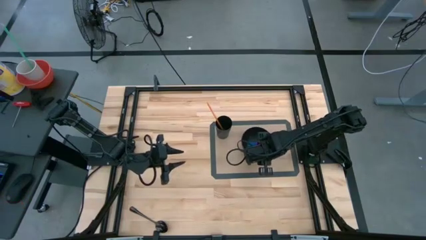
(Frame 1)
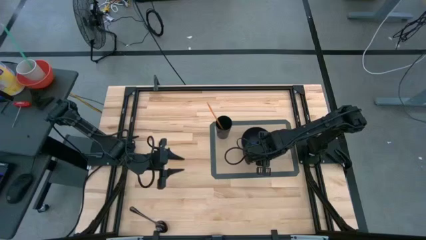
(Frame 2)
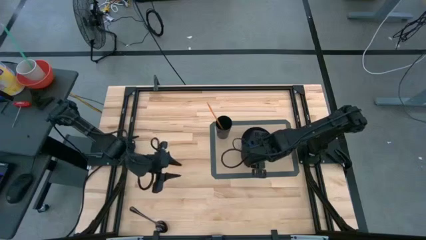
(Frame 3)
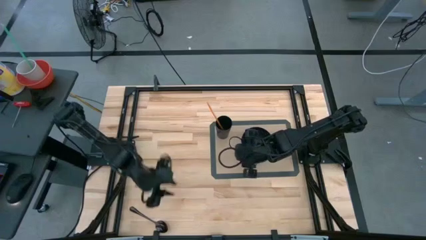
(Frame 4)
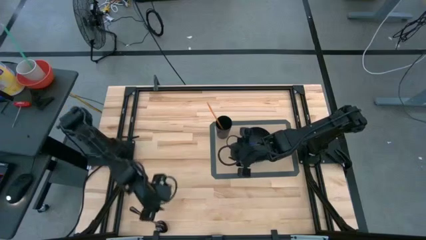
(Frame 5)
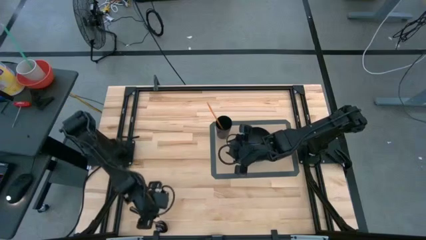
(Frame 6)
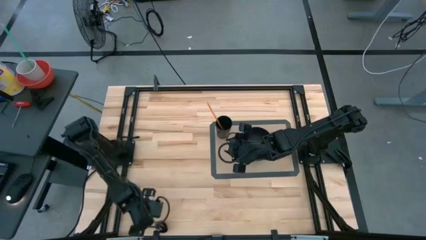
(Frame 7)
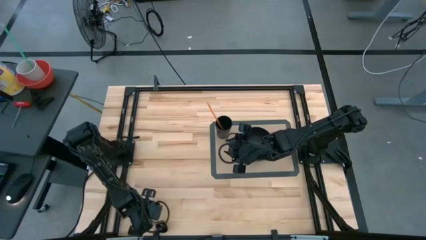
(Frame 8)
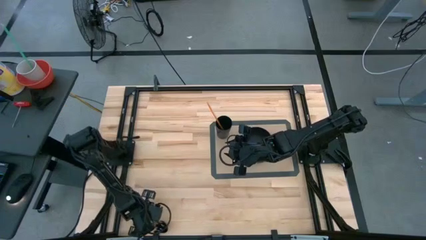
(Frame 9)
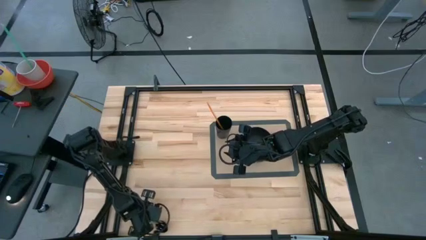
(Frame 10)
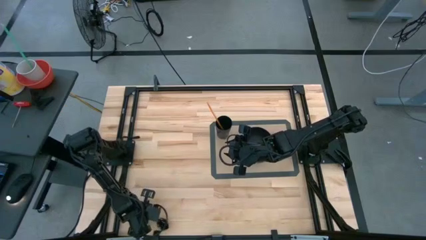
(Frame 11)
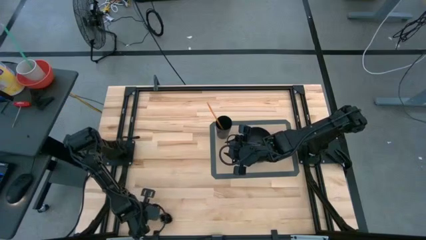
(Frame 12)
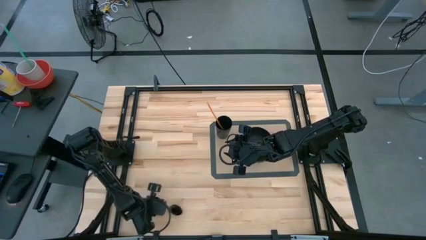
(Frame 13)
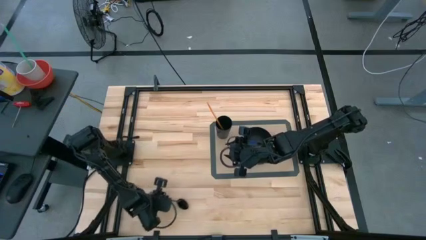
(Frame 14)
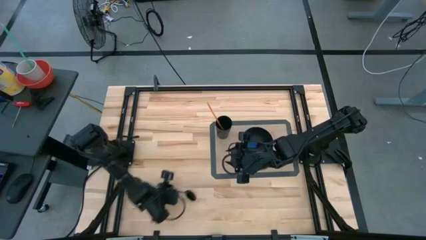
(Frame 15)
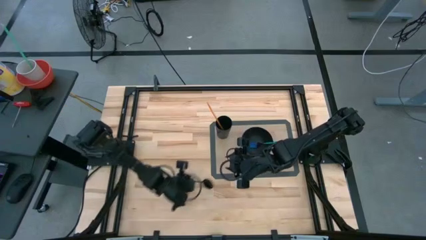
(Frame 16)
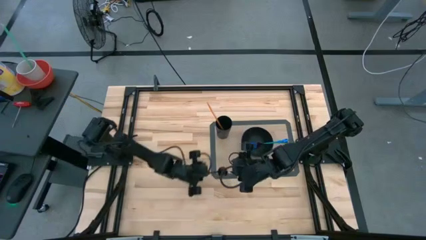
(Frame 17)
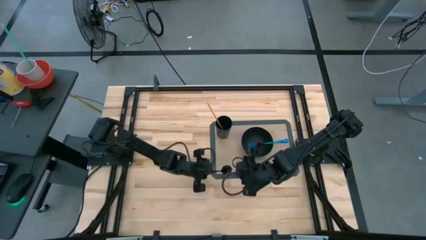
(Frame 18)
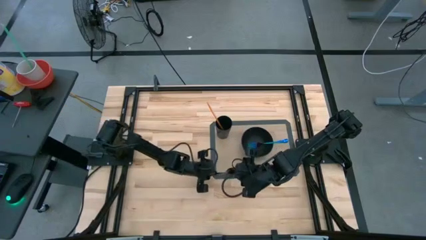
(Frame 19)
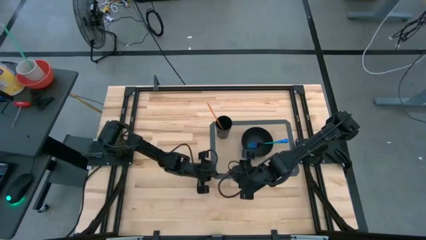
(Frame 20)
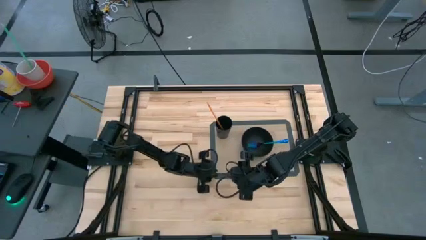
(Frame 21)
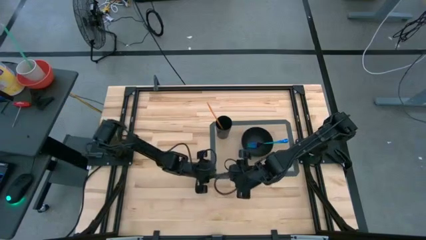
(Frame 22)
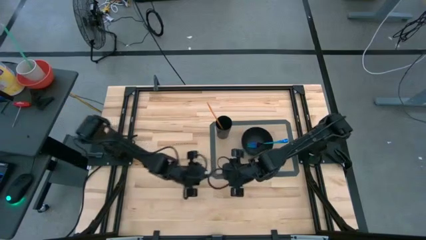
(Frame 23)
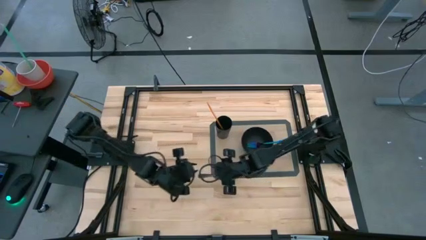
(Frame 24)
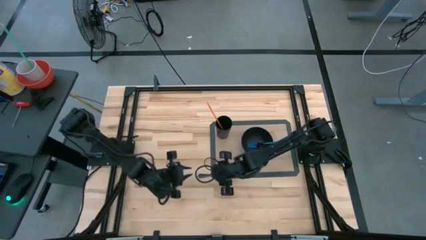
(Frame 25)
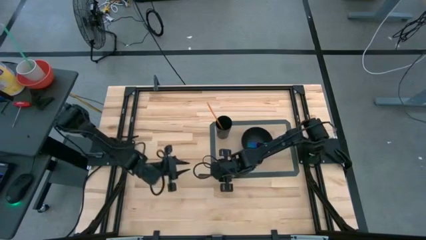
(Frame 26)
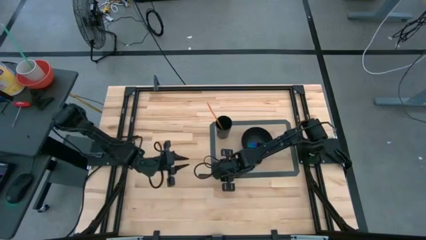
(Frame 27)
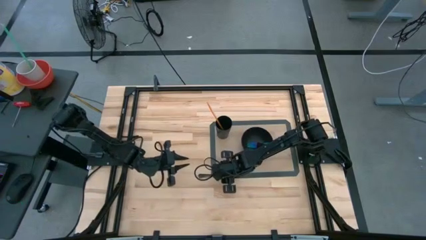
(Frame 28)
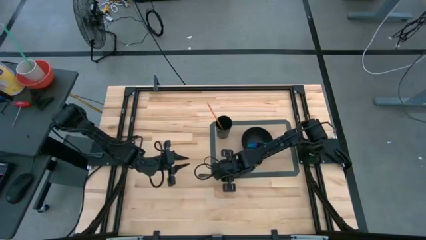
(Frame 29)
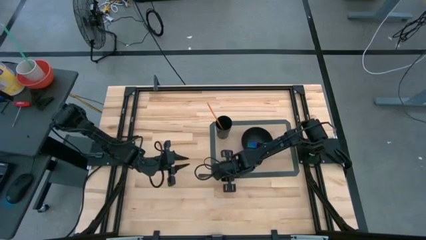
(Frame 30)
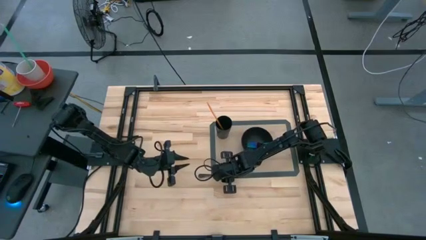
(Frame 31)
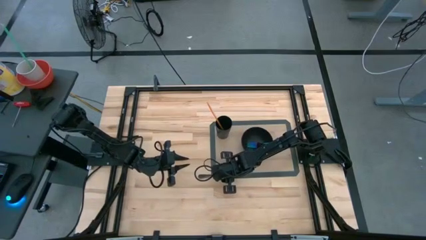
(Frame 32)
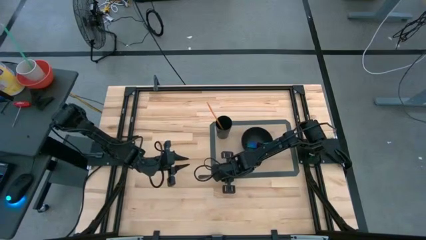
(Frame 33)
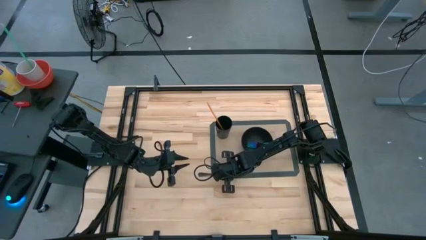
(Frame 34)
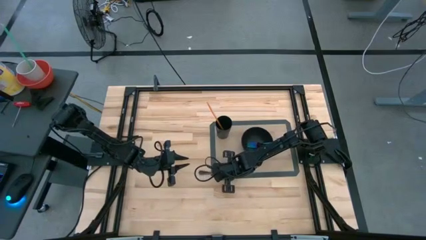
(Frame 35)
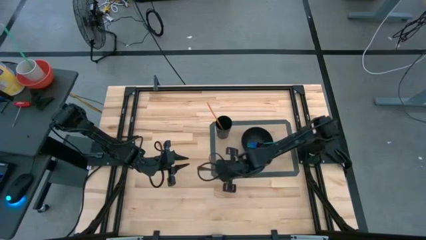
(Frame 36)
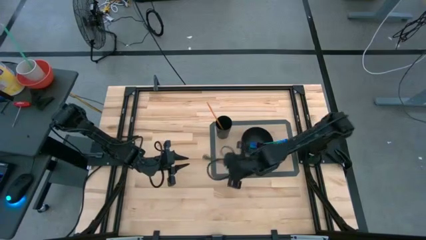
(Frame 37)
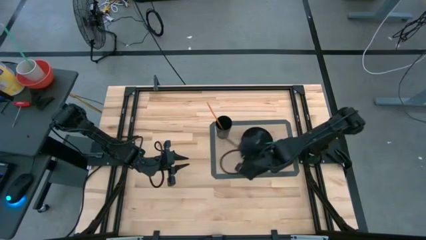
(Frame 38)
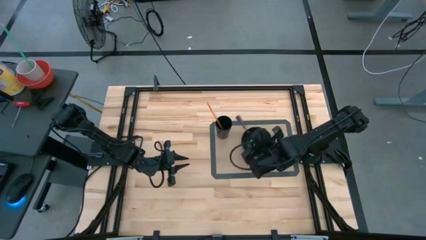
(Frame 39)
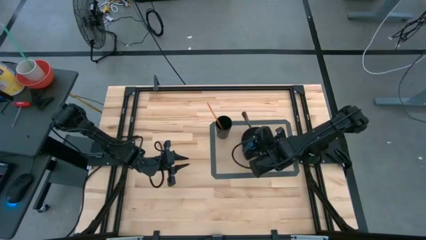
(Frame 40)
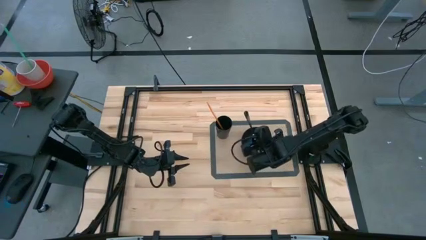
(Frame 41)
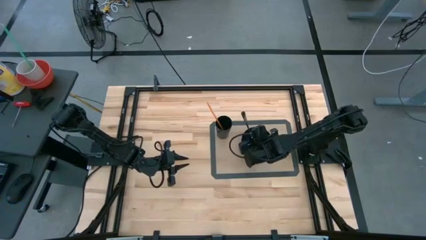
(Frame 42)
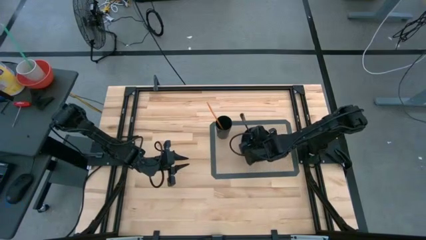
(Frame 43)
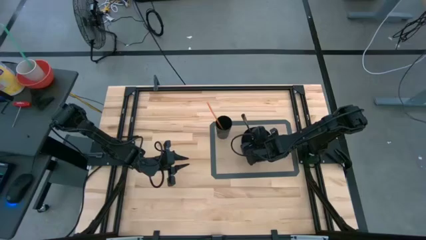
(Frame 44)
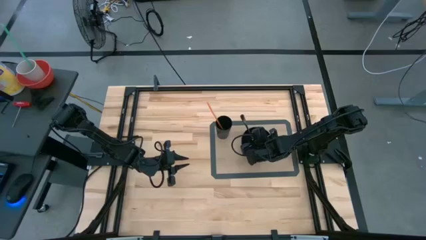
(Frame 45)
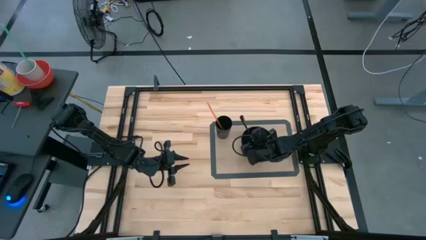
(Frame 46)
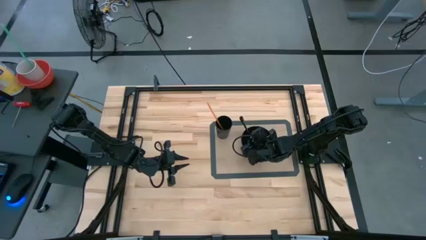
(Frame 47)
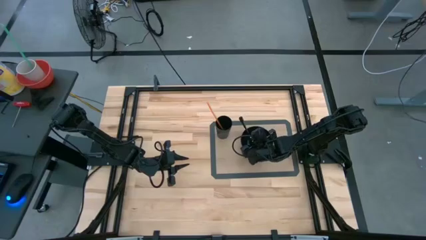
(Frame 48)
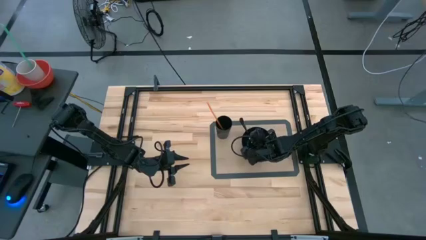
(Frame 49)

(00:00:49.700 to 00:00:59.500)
Task: Pick & Place Utensil
Put the black spoon into the black bowl

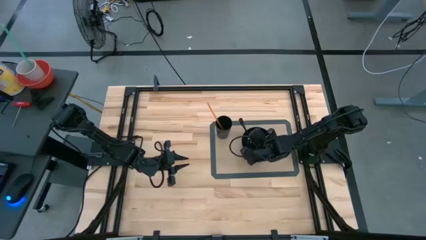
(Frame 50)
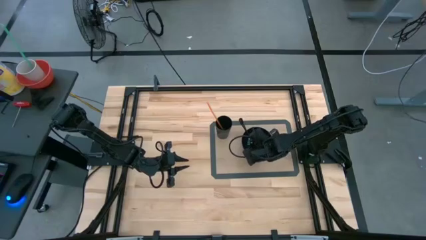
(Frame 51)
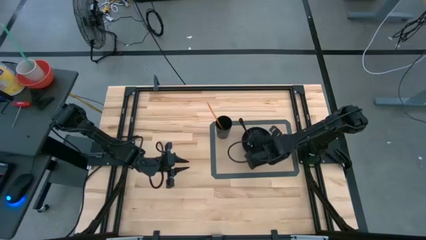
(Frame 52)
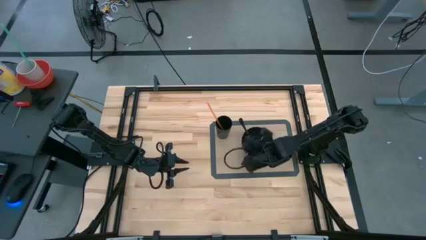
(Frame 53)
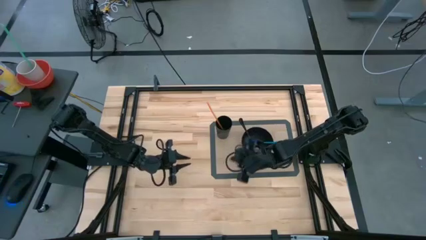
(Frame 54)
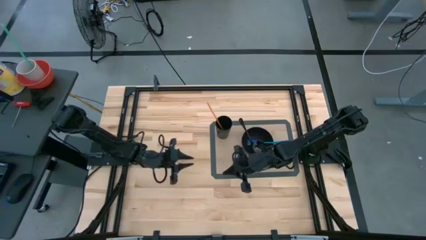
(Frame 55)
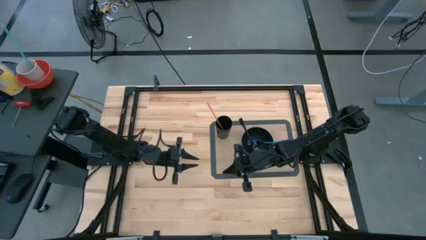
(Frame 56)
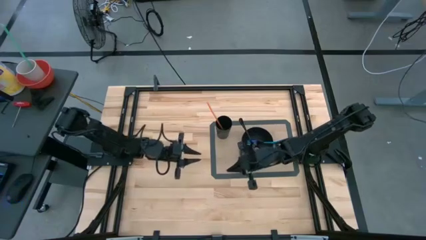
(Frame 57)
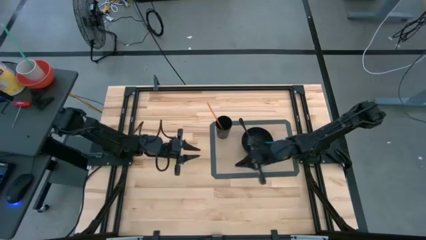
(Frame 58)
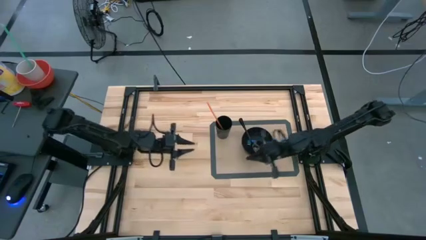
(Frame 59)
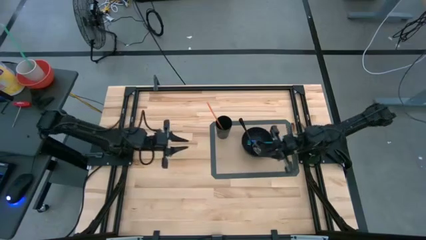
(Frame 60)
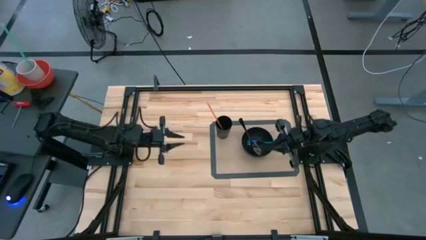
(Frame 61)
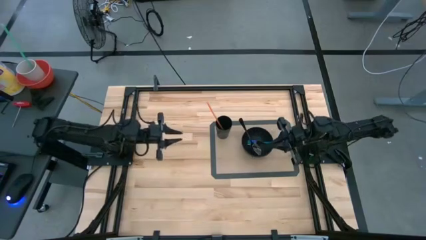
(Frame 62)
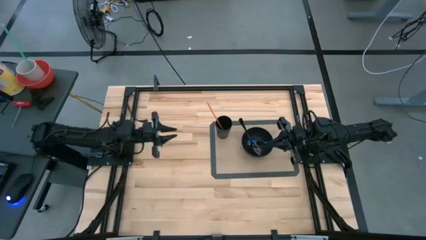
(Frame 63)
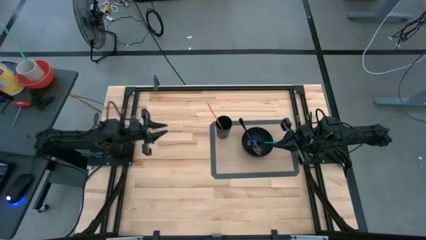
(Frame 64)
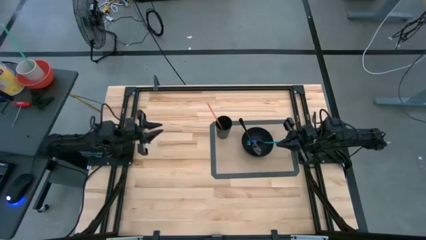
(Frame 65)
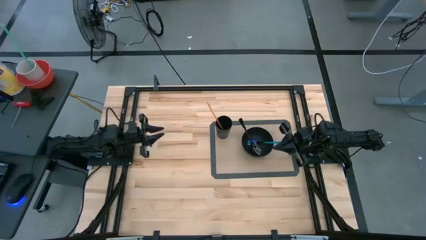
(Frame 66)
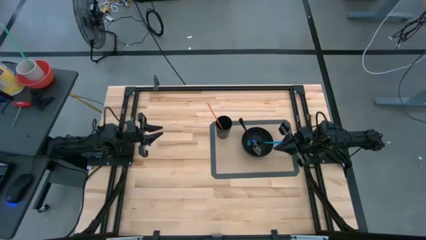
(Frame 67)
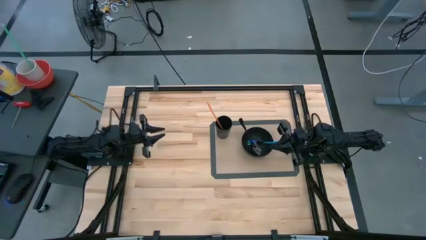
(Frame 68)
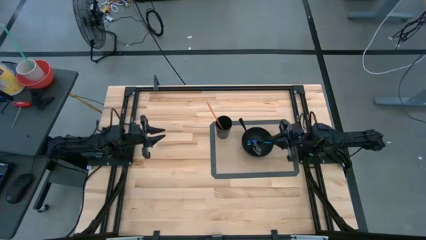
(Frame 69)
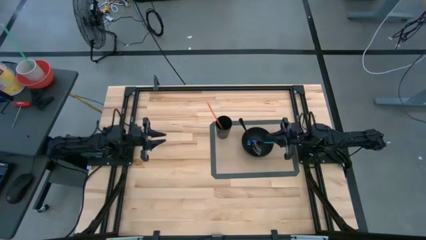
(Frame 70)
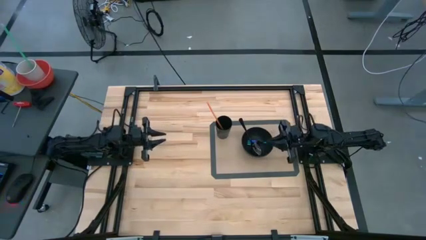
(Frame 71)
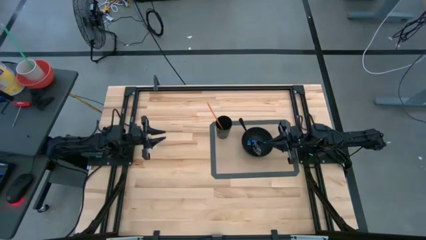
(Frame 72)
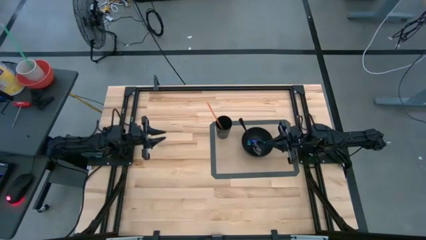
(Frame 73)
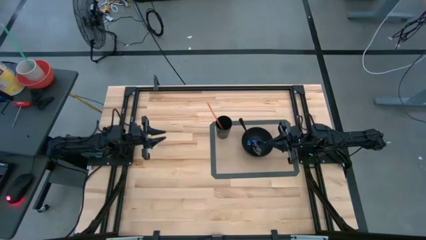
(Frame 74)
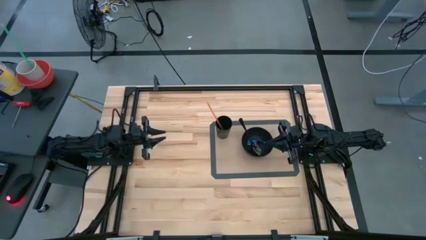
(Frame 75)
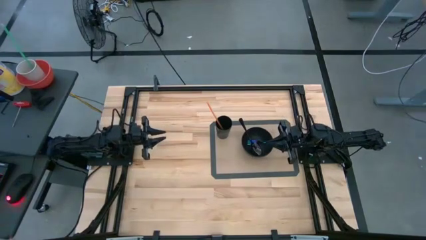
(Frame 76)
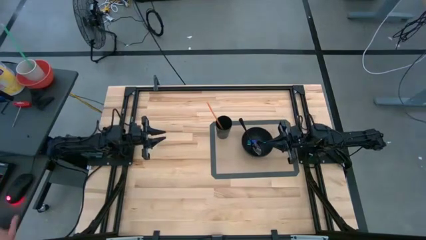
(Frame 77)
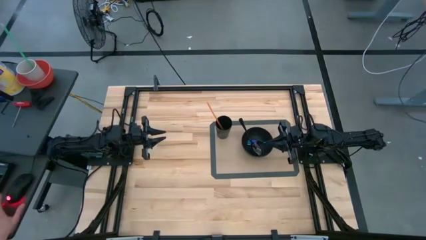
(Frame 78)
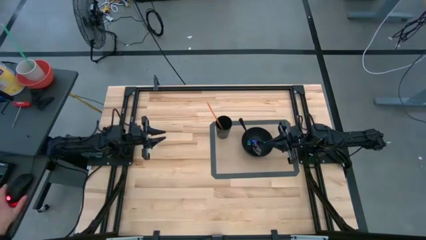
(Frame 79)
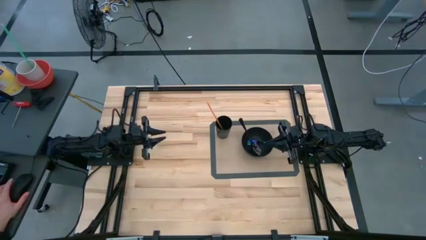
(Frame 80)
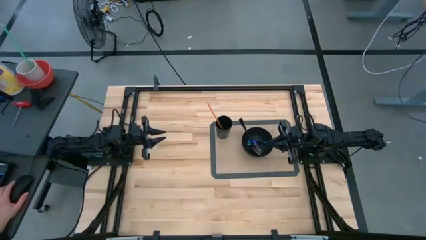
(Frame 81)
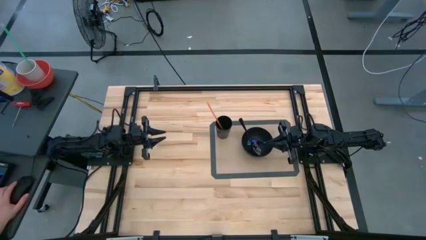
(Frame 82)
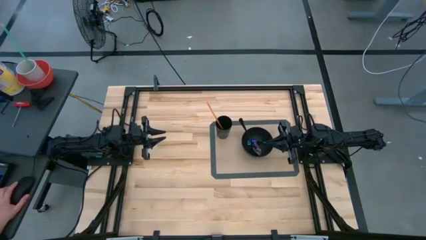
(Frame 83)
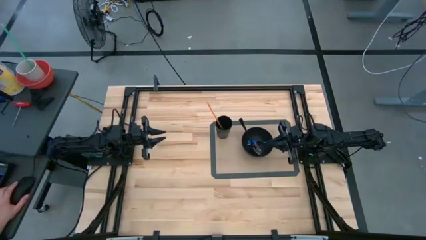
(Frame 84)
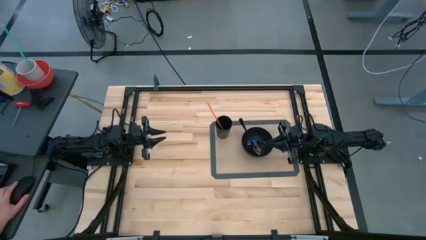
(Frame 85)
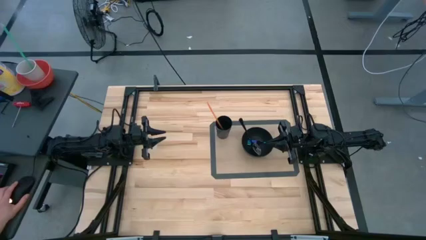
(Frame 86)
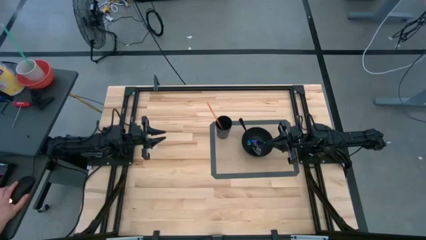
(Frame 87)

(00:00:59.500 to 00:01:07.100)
Return to Home Position
